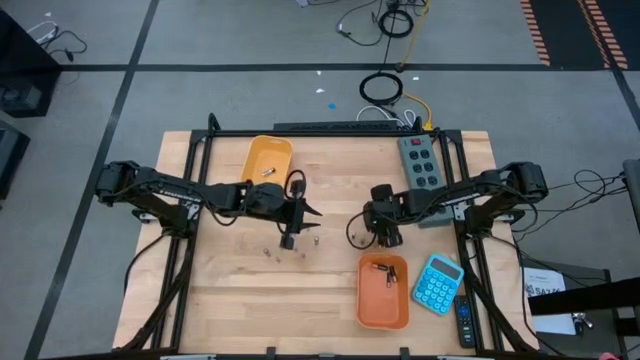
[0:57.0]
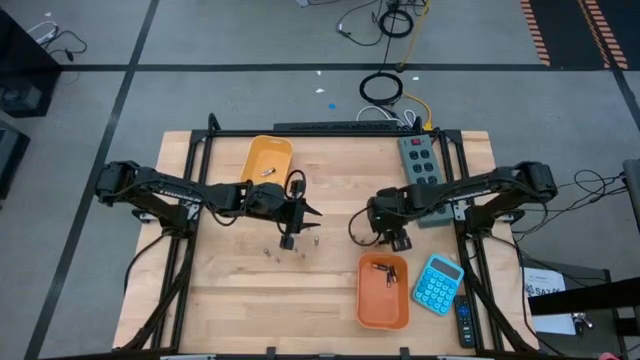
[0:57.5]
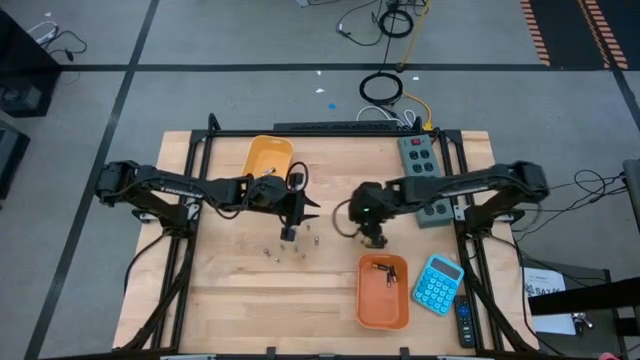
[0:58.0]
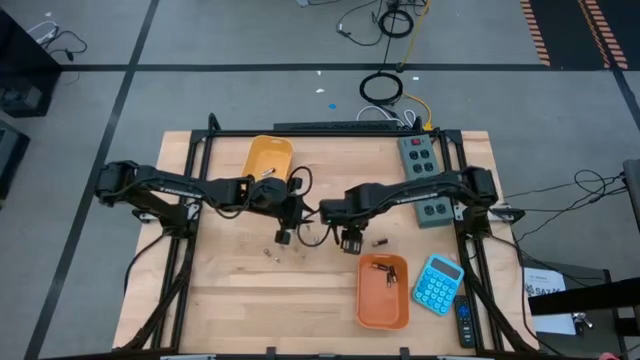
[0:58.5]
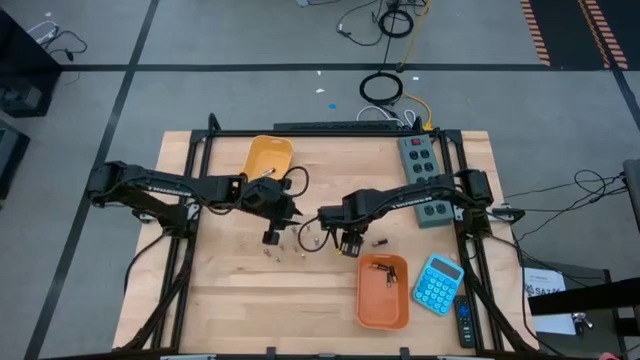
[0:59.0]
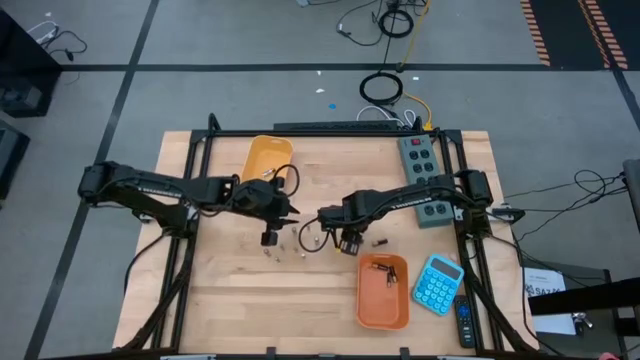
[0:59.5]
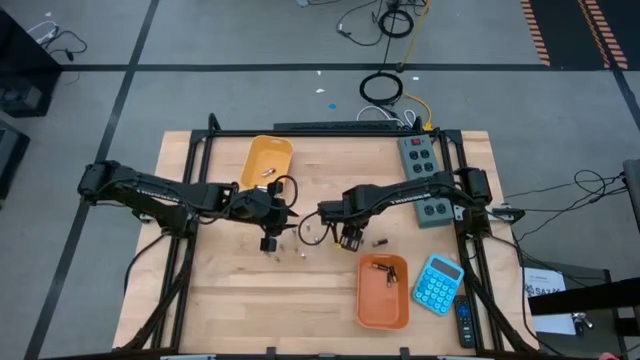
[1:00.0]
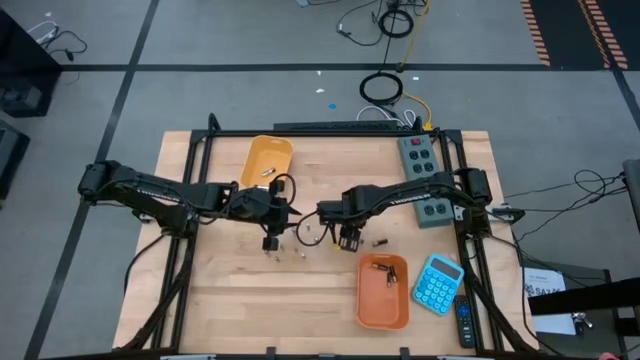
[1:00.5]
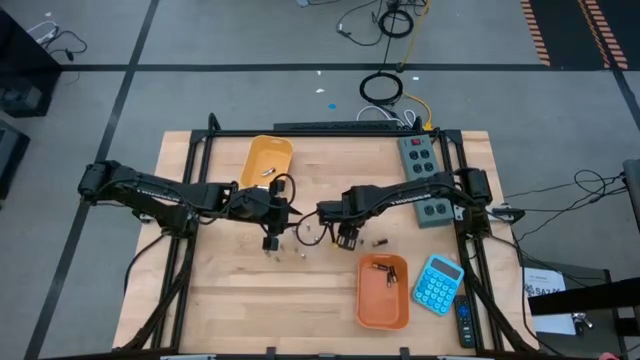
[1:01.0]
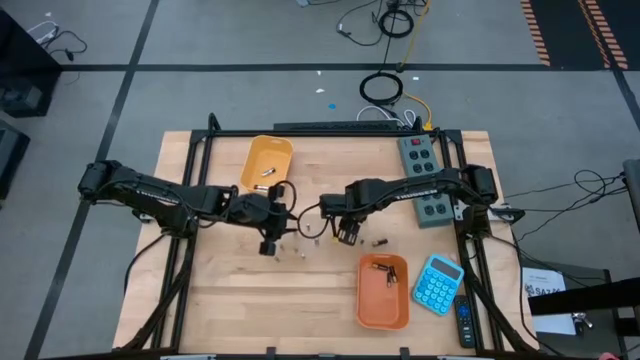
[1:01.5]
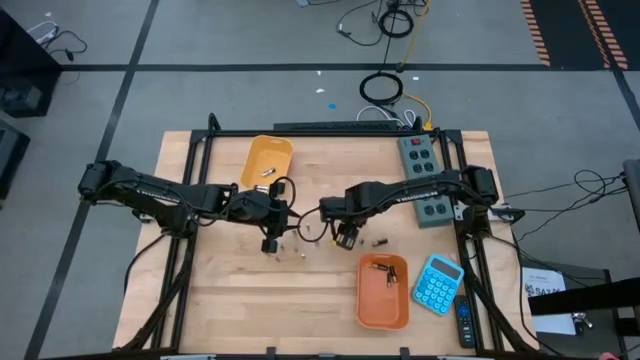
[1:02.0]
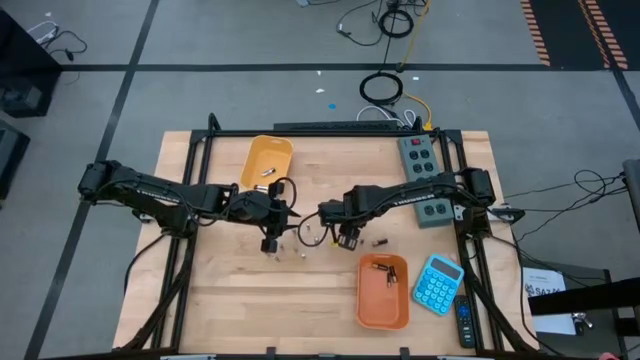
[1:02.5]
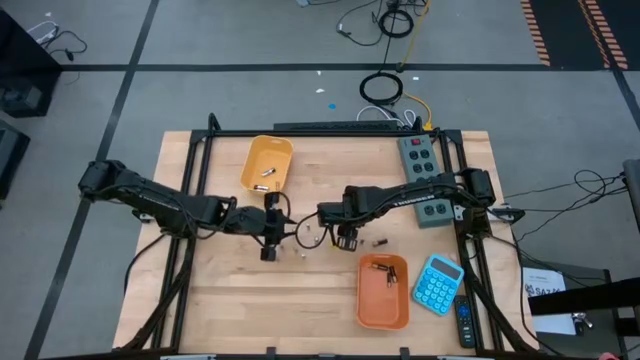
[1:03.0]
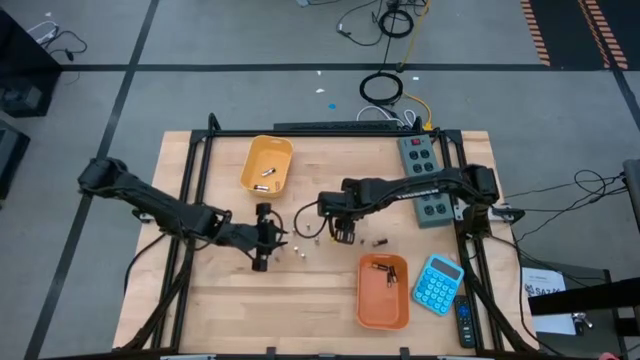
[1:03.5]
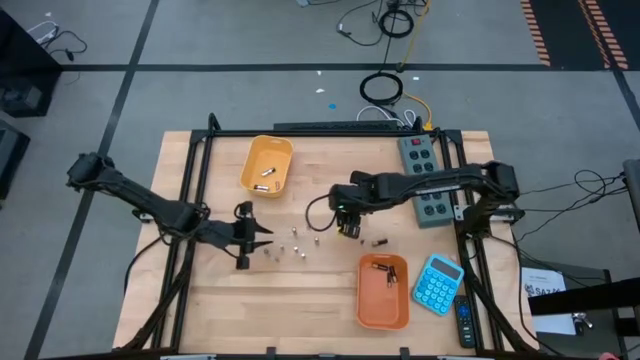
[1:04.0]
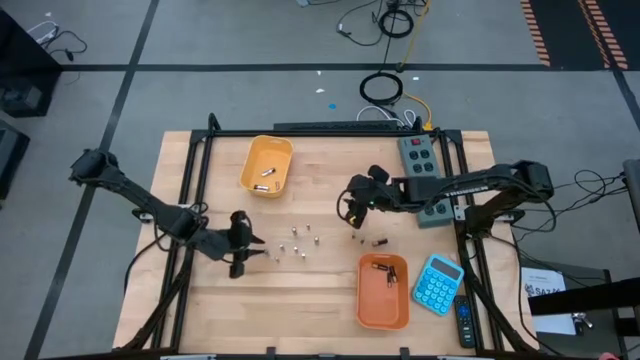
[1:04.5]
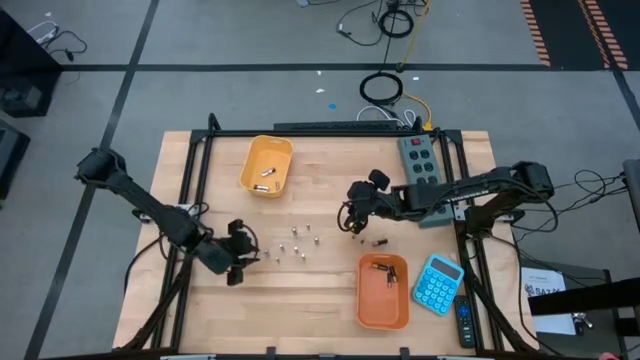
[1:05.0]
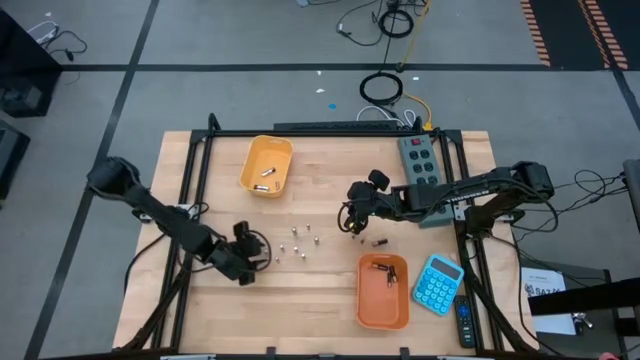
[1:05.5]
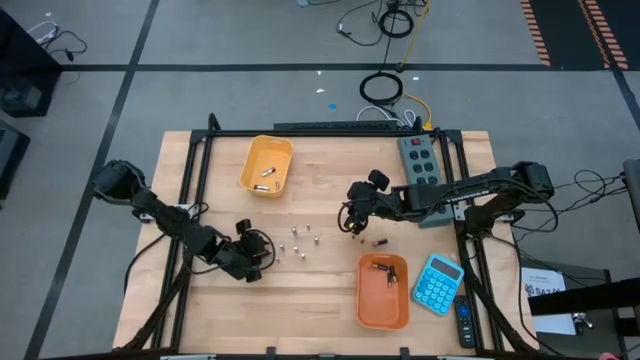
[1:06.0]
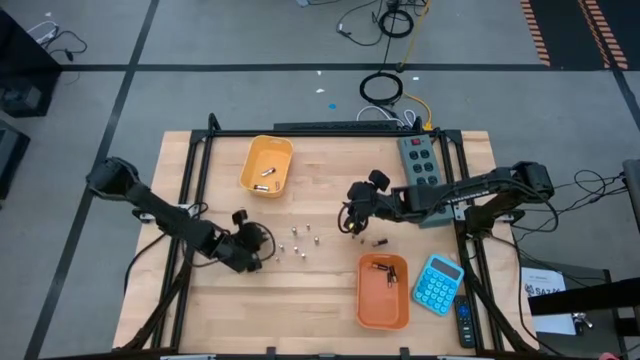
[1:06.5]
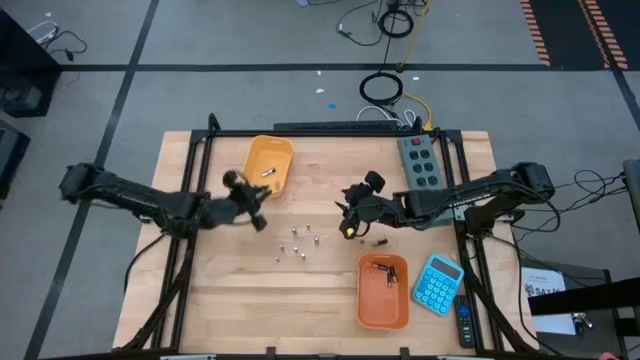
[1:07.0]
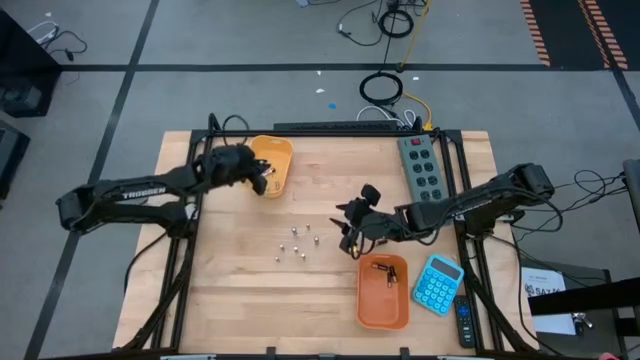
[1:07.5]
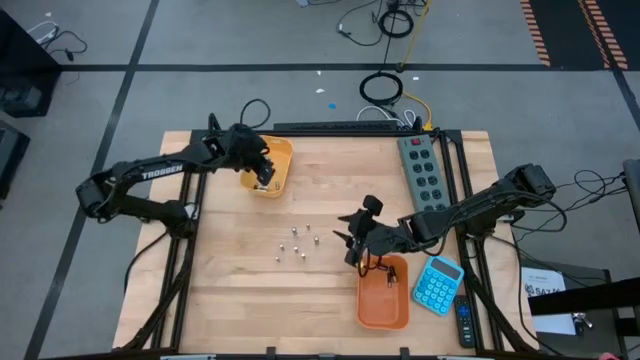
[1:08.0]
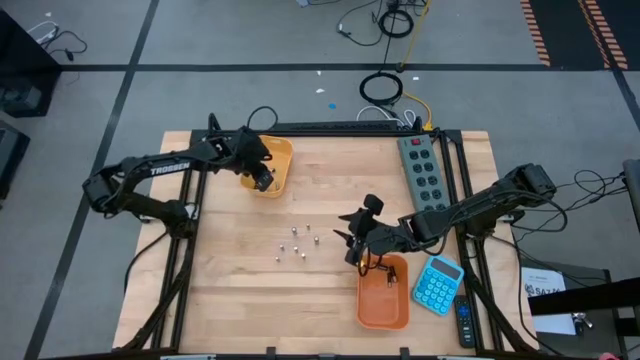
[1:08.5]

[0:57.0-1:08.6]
Task: Sort batteries
Put the silver battery into the yellow bin

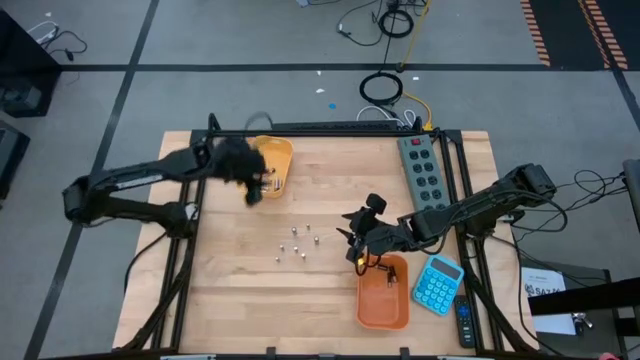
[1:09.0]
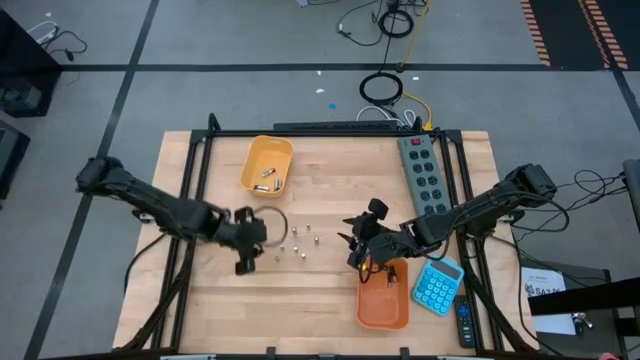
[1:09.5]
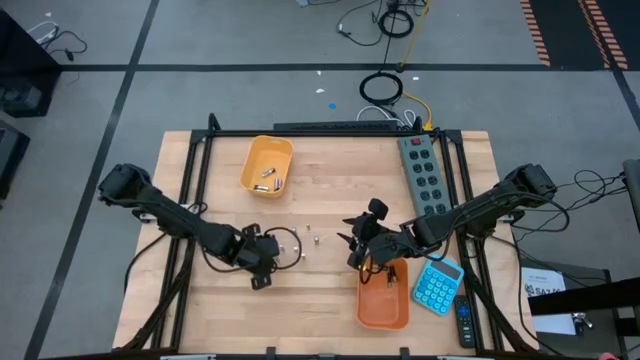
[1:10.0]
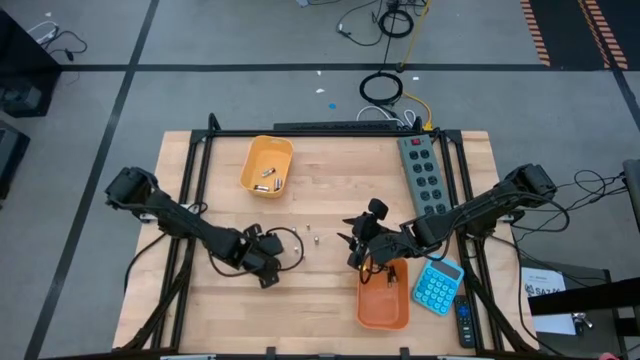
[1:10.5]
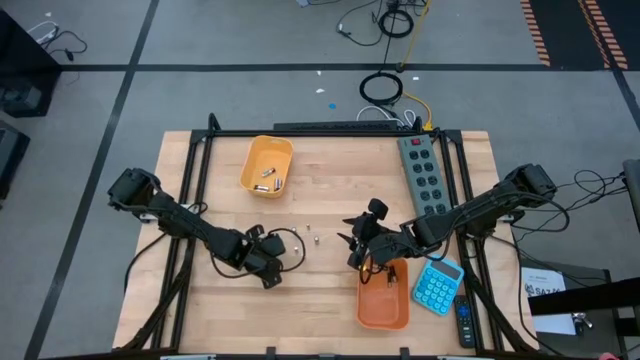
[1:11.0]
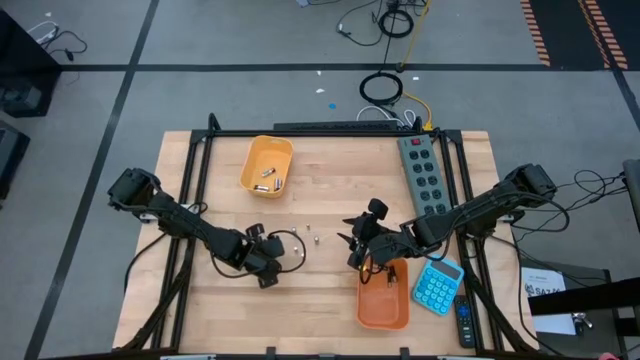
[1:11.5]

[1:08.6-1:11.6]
Put the silver battery into the yellow bin

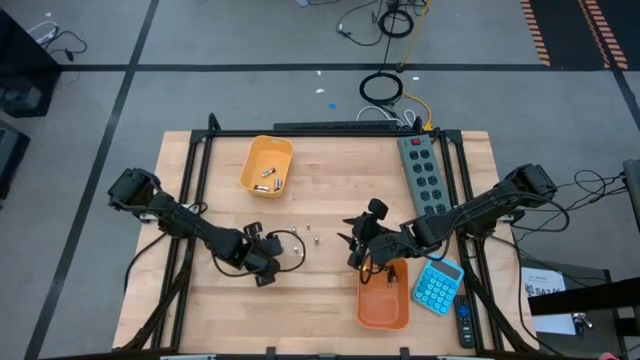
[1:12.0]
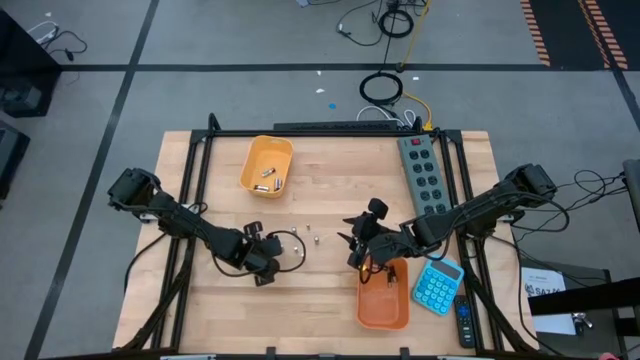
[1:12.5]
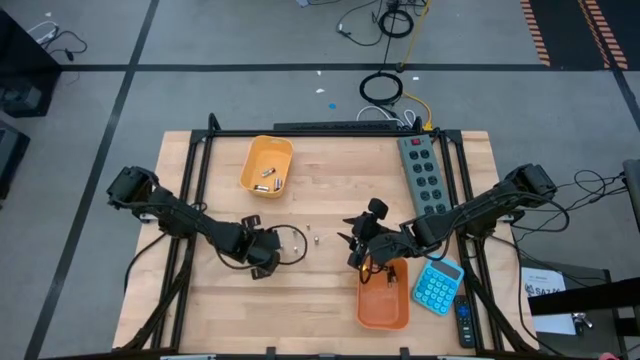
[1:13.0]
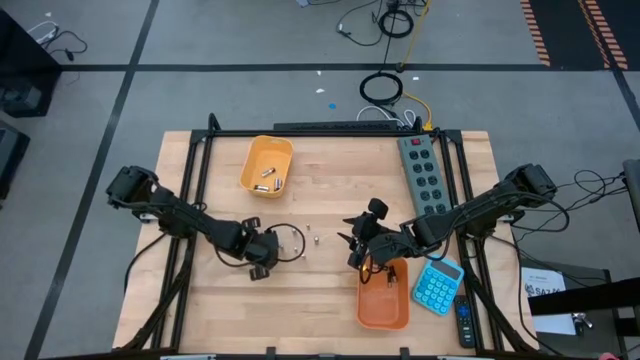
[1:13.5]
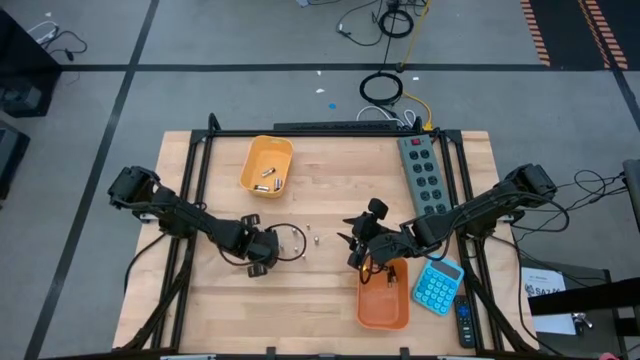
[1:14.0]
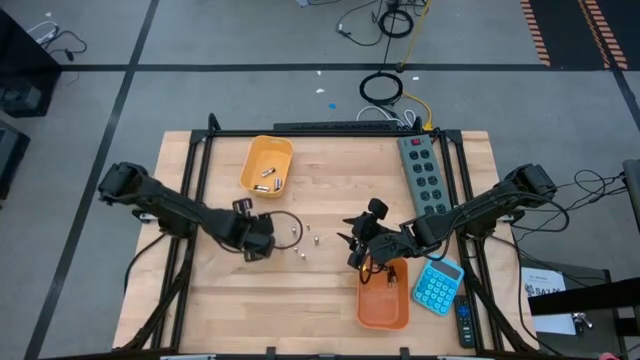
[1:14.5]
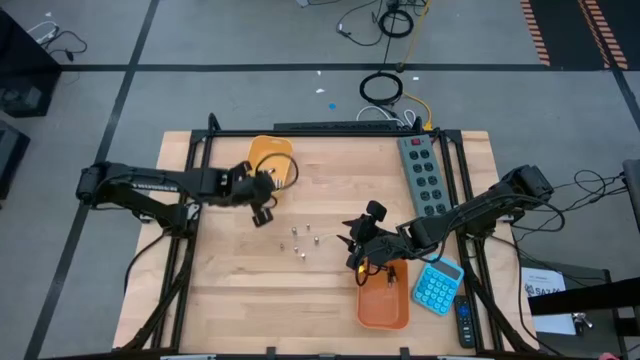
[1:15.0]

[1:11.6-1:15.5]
Put the silver battery into the yellow bin

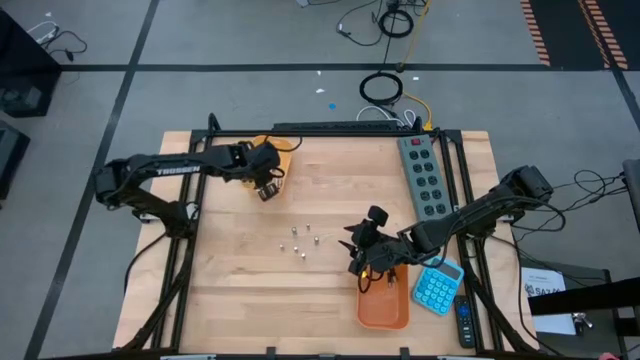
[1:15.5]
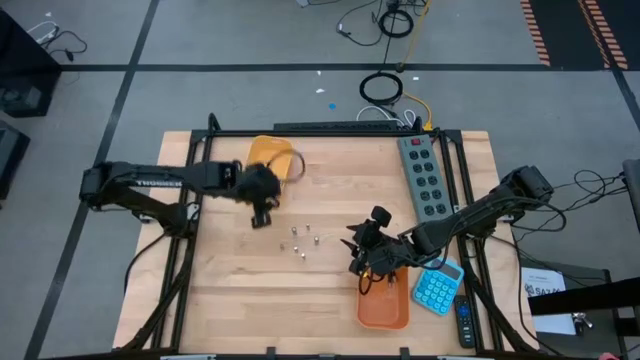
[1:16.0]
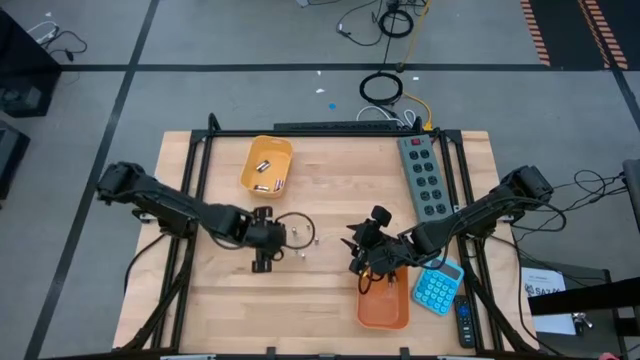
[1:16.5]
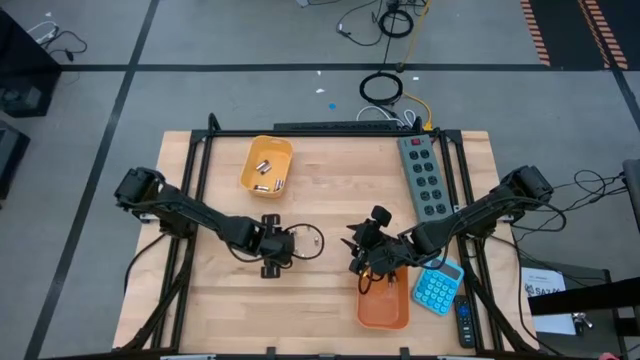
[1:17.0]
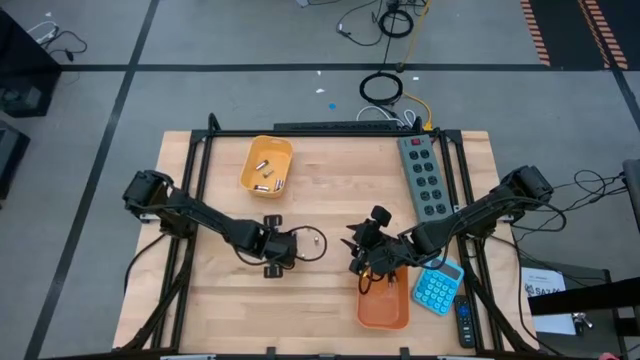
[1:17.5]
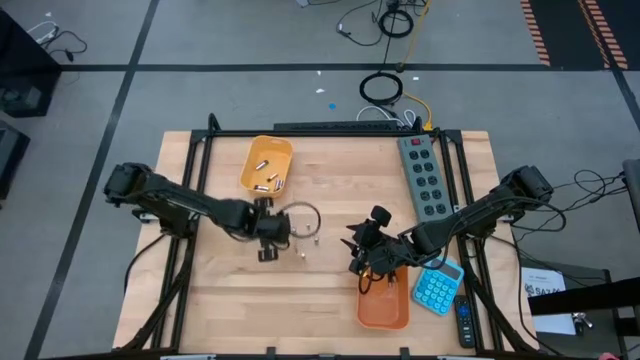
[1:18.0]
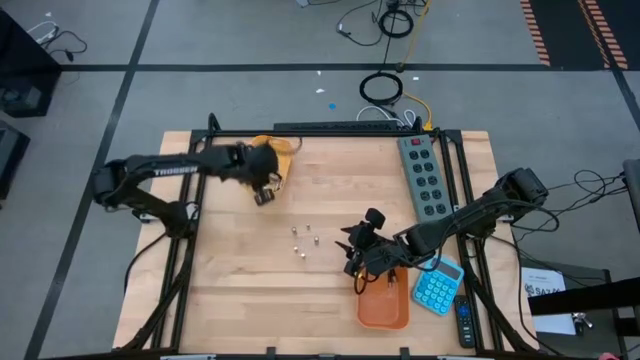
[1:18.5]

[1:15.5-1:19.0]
Put the silver battery into the yellow bin
